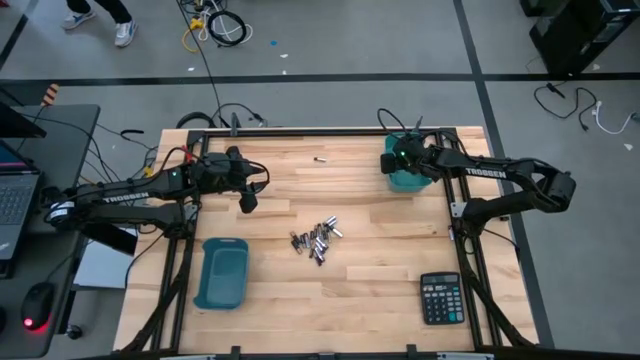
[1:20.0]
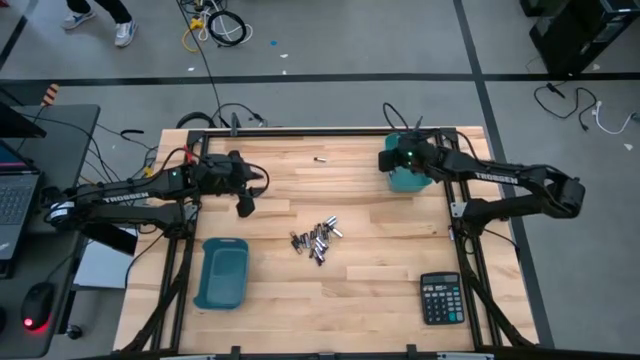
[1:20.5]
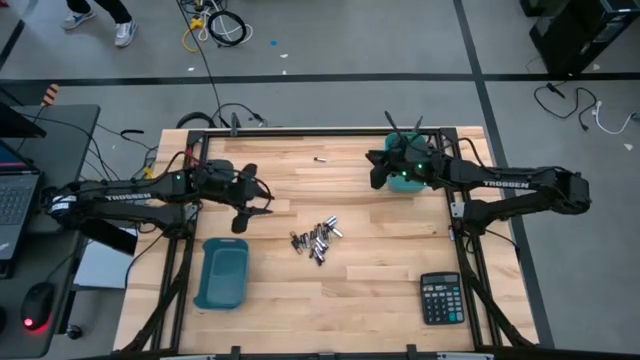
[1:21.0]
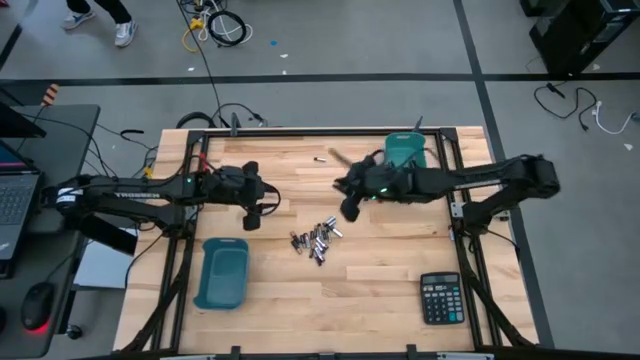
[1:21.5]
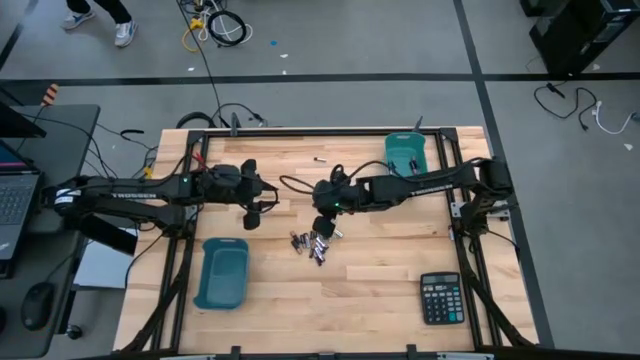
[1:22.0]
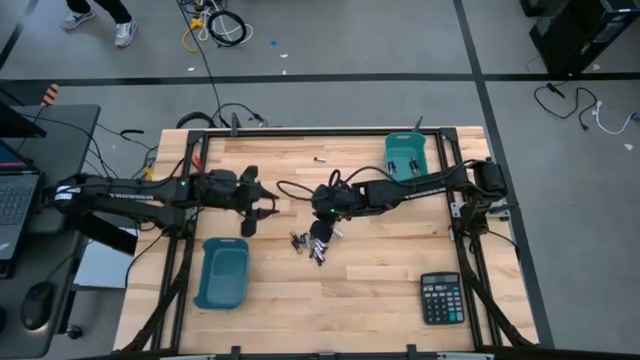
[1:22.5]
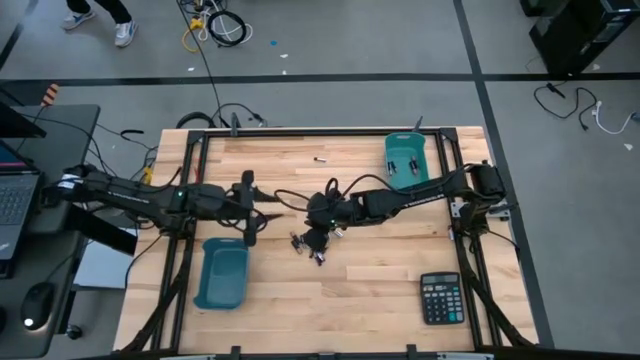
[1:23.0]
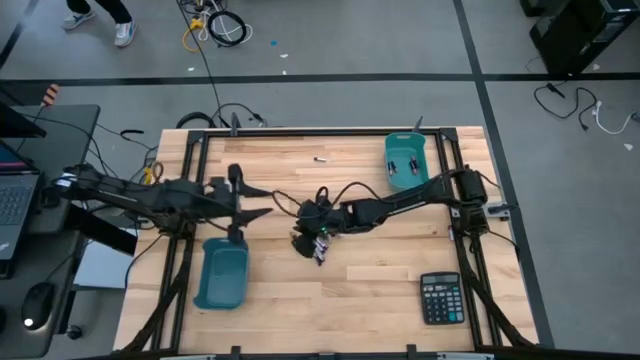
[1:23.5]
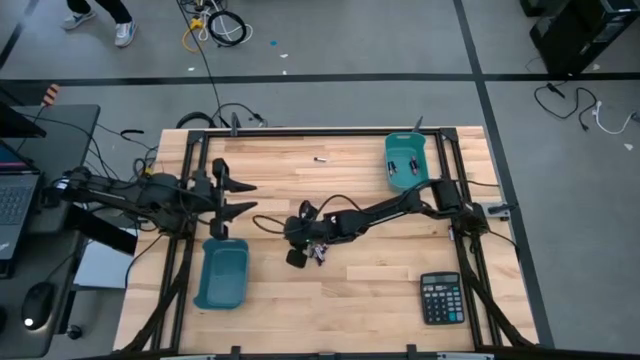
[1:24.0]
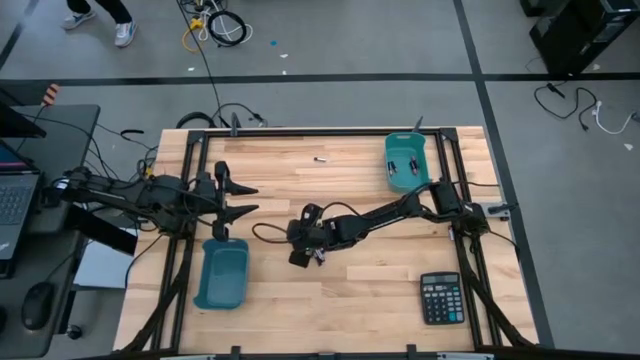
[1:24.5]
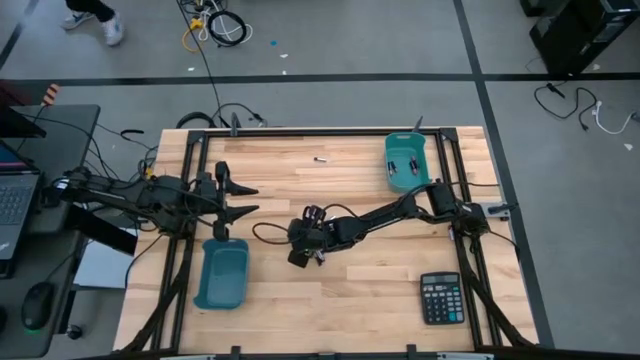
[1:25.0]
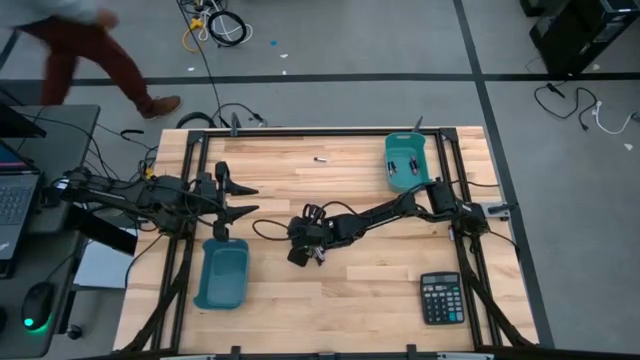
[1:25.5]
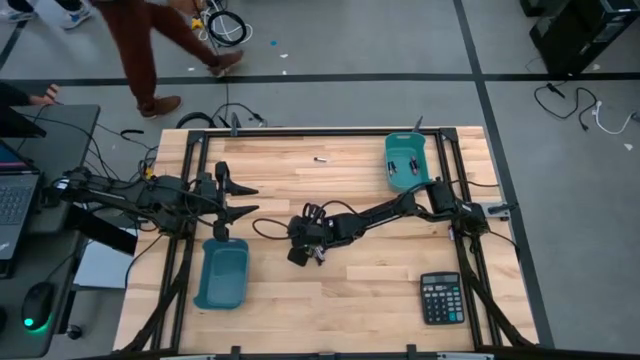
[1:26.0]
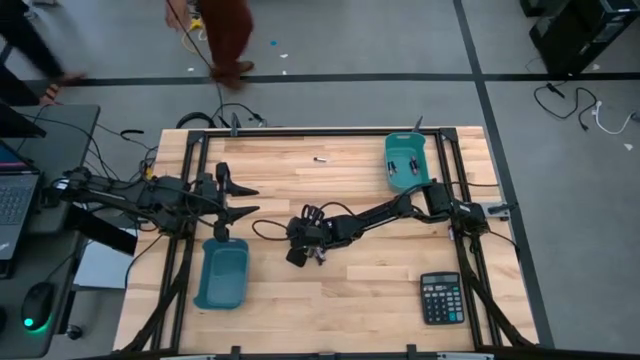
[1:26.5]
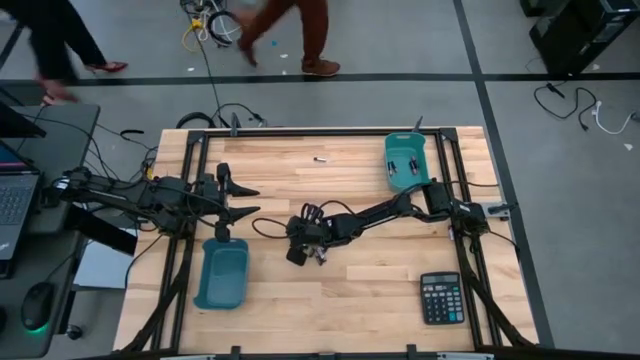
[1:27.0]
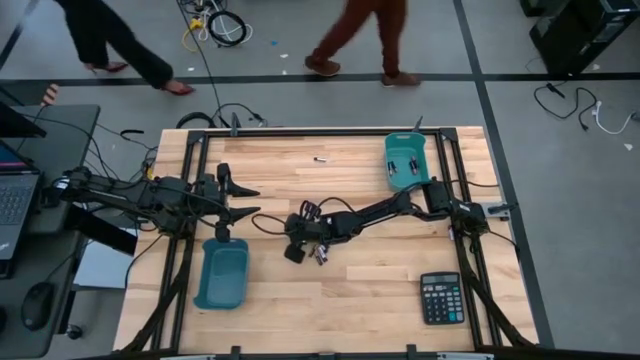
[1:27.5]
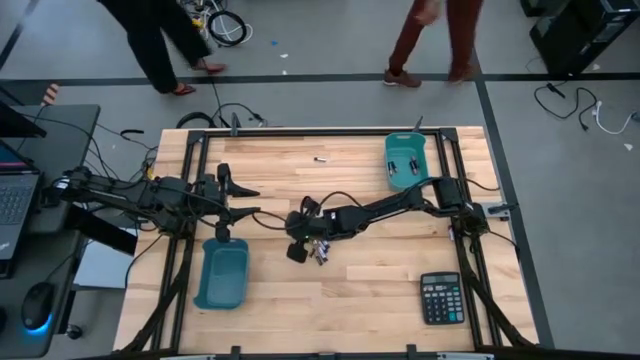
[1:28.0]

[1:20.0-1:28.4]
Task: Sort batteries
Put the black battery into the green bin

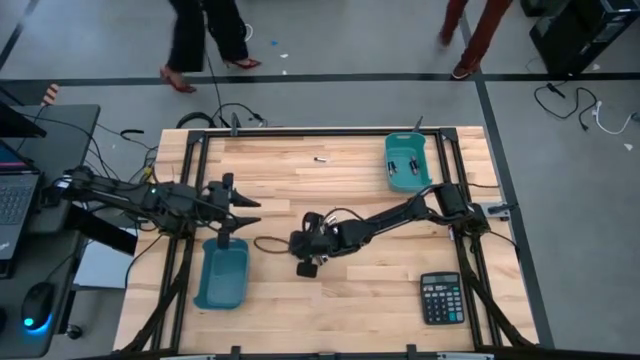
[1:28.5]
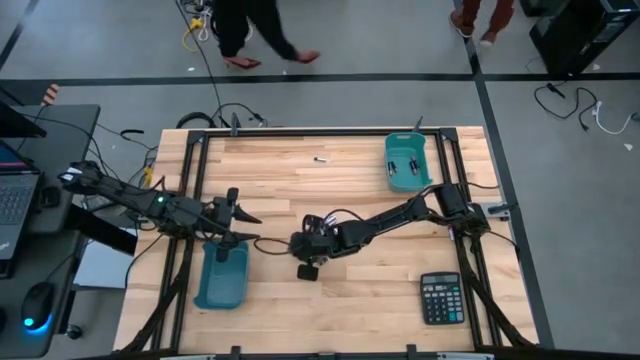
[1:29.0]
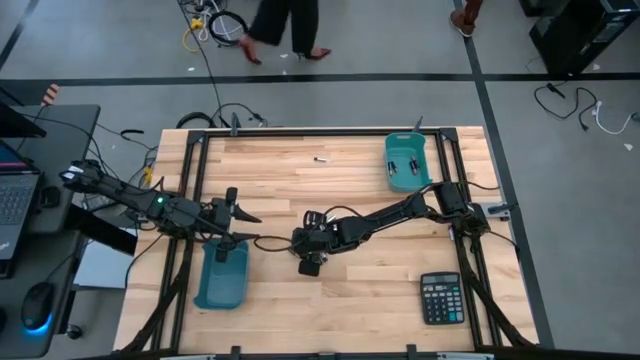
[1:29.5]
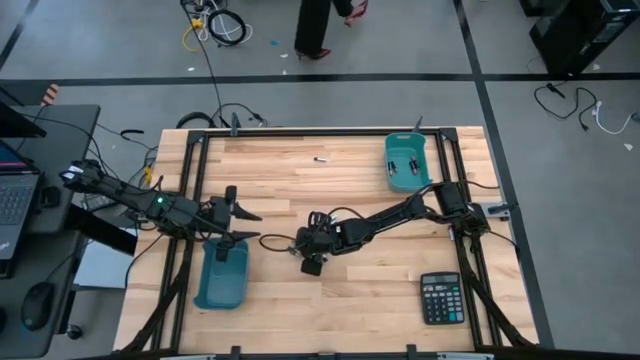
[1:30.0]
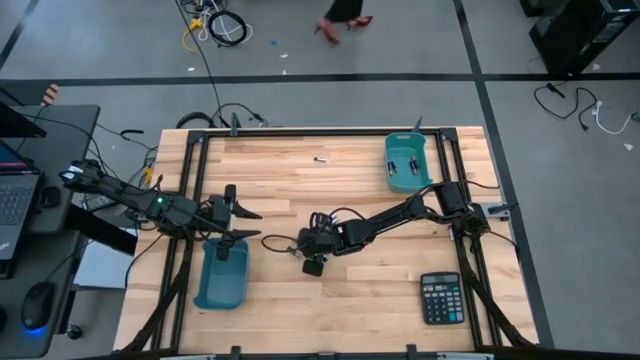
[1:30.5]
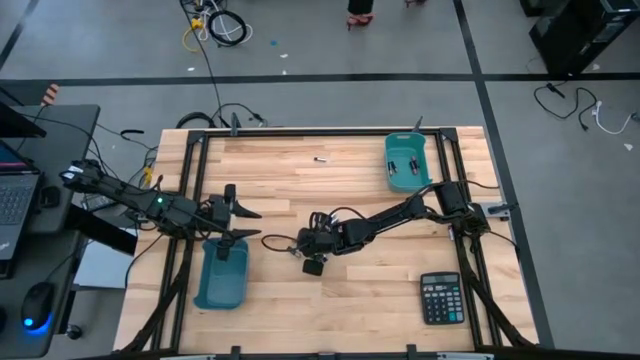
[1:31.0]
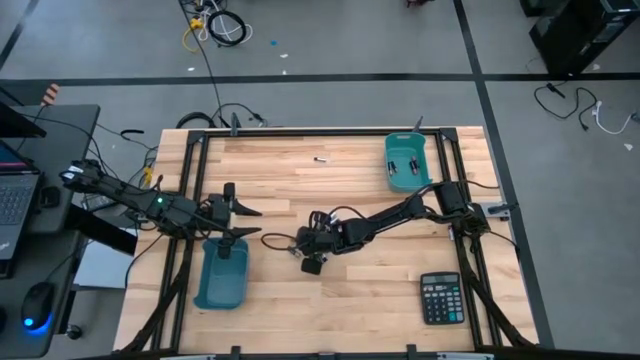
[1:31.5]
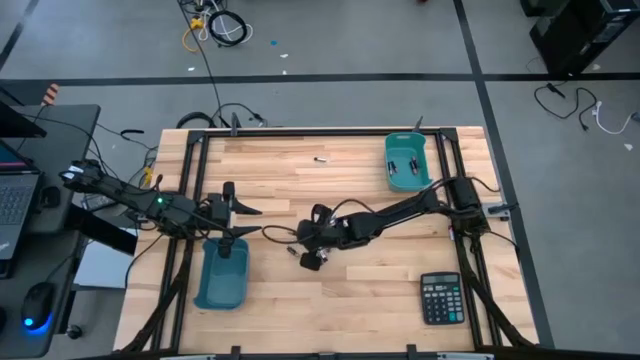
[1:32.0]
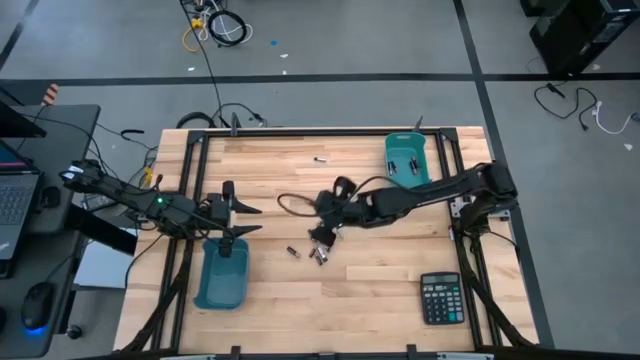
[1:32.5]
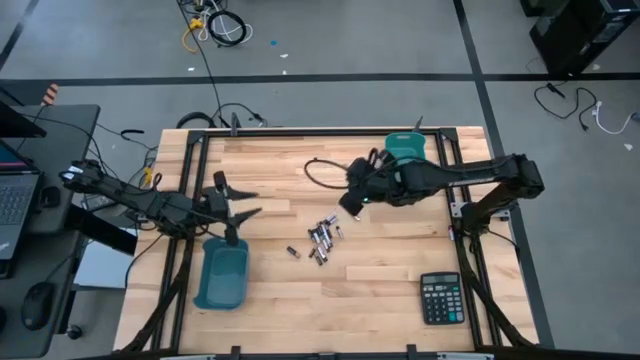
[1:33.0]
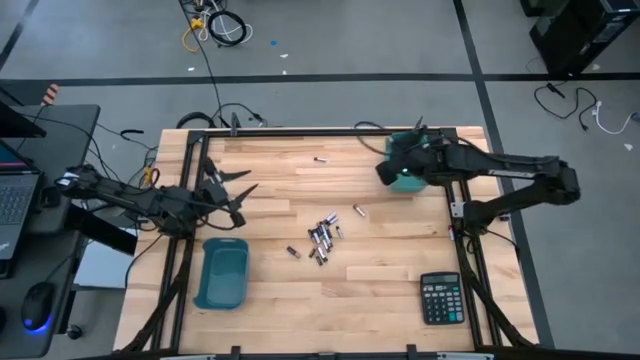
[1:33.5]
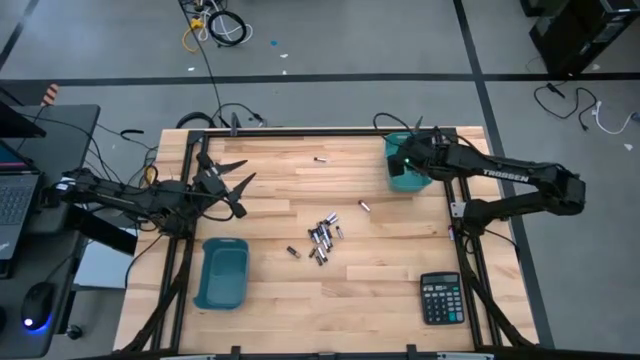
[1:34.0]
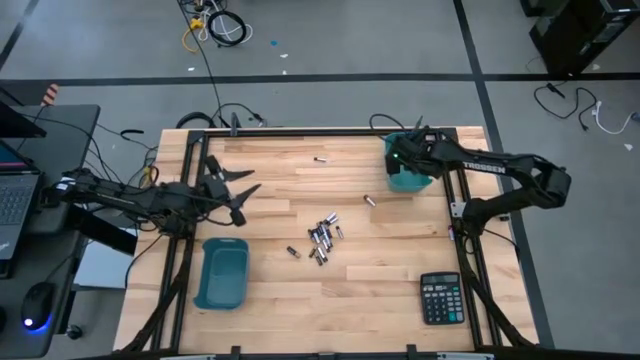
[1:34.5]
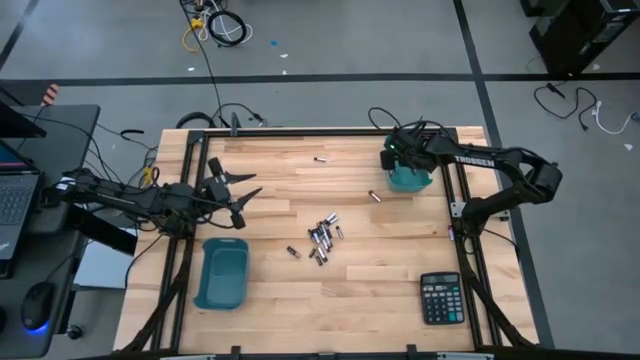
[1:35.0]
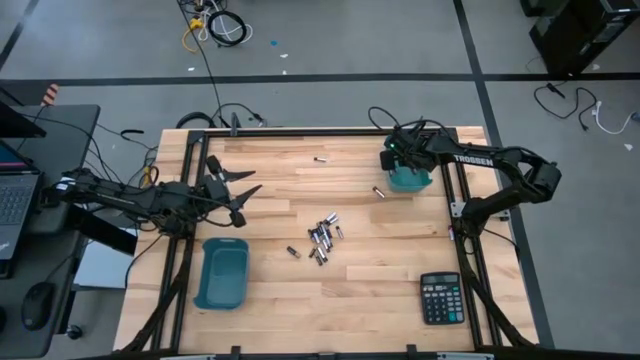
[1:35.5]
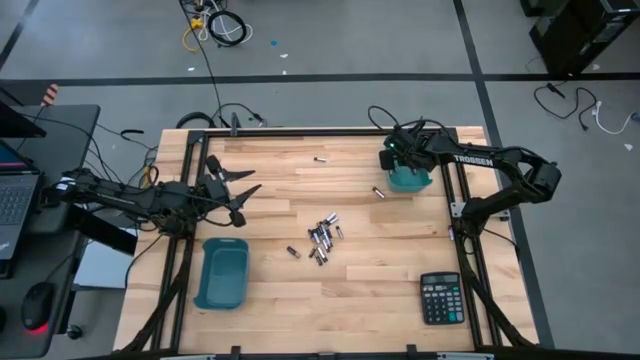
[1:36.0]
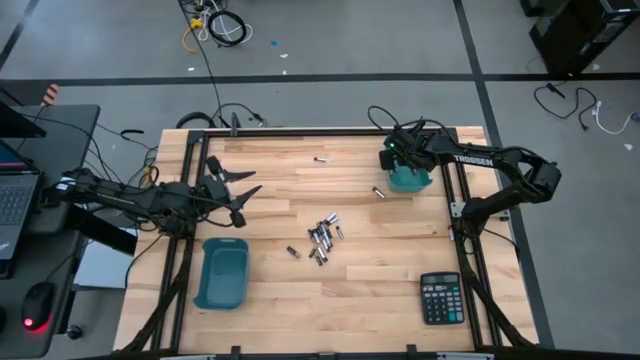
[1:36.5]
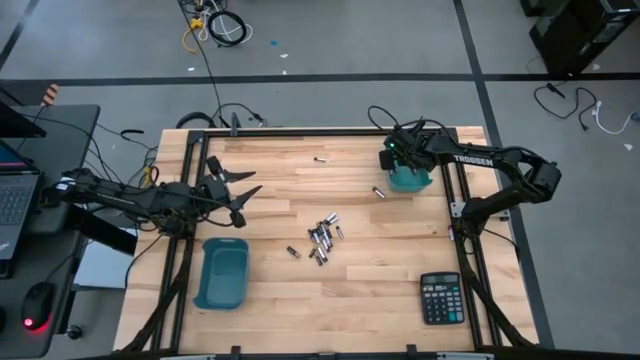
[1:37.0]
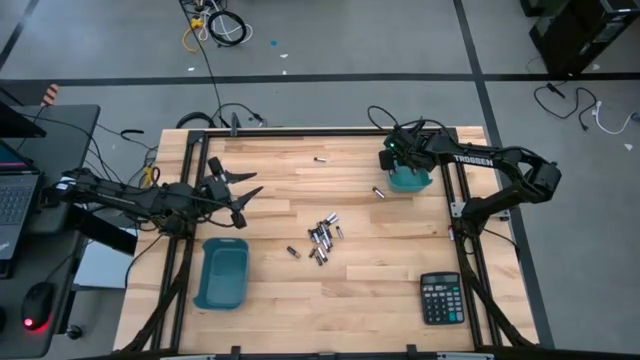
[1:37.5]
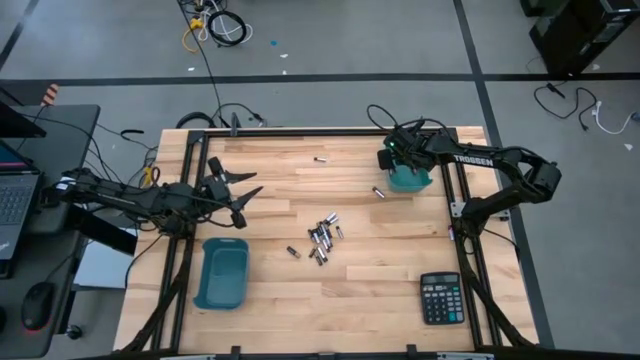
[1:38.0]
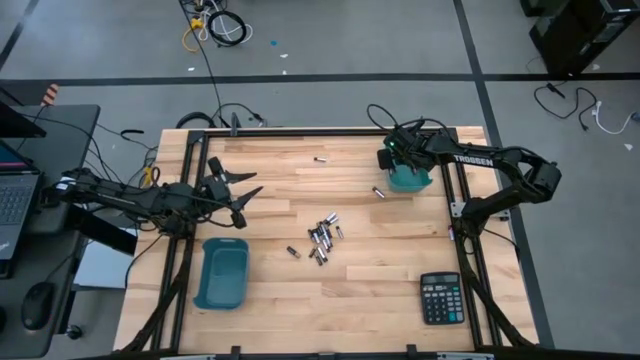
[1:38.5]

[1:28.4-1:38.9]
Put the black battery into the green bin

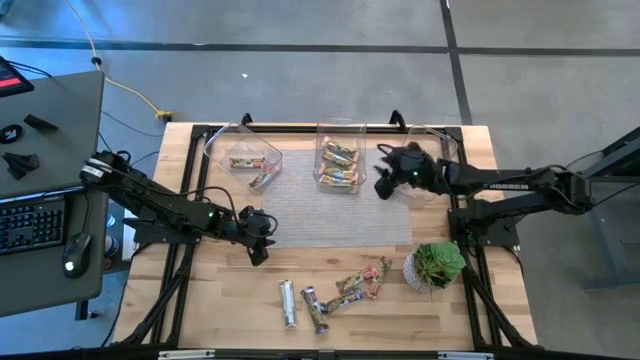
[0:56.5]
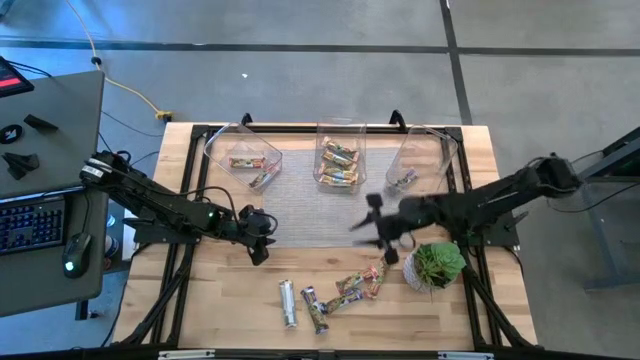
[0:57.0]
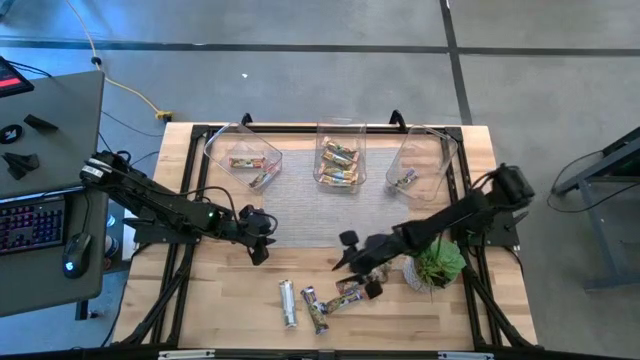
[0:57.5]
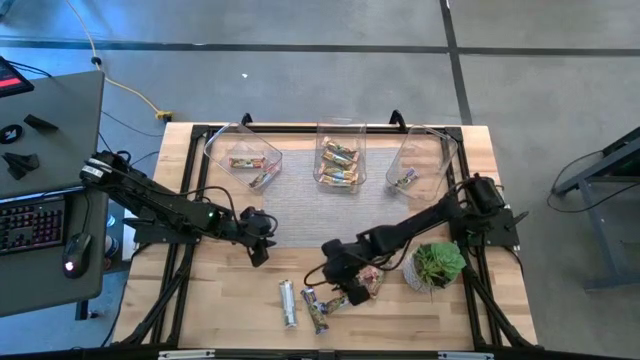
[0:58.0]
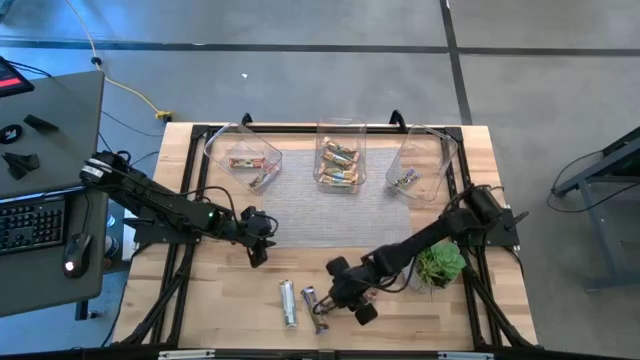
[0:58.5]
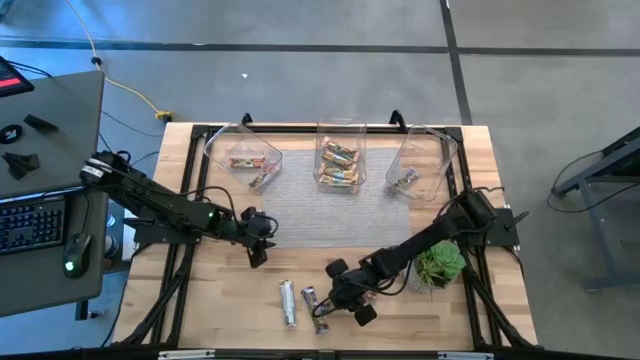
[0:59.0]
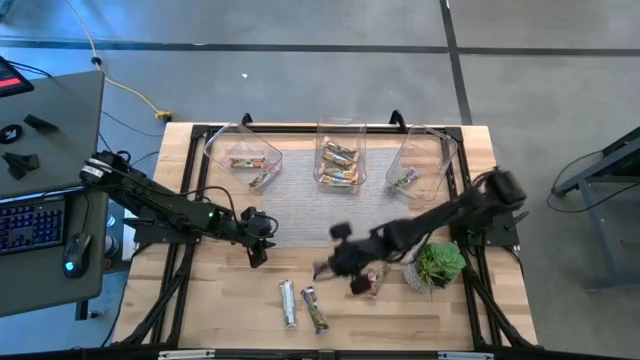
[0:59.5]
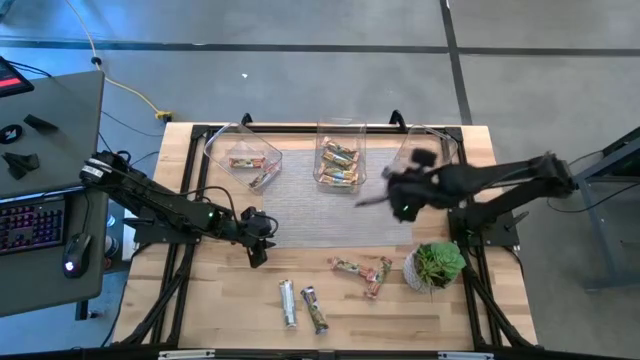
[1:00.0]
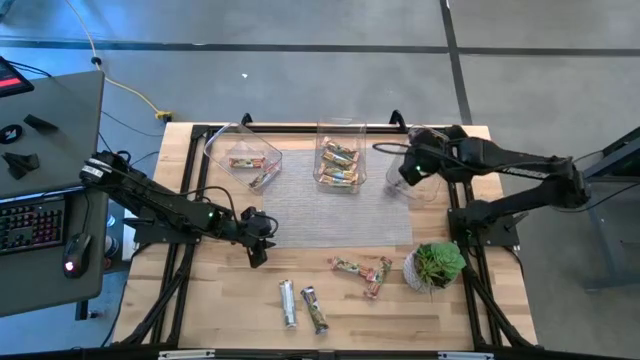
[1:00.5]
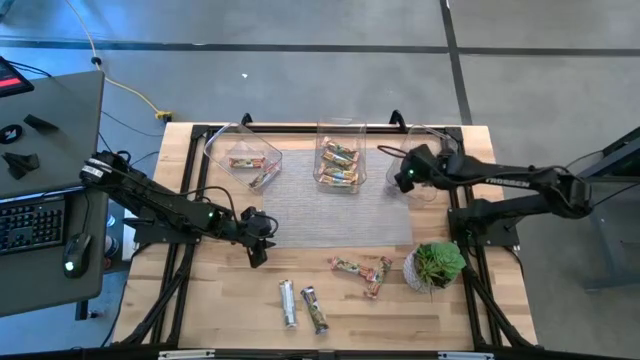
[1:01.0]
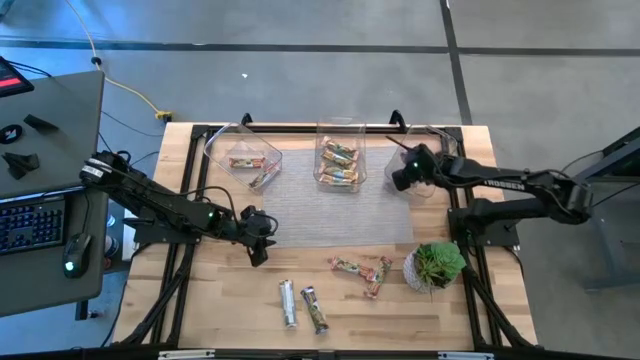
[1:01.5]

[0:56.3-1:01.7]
Task: Pick and place Granola Bars by type
Put the blue granola bar into the right transparent bin
